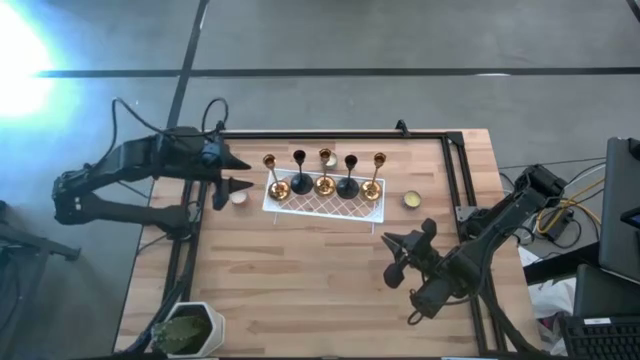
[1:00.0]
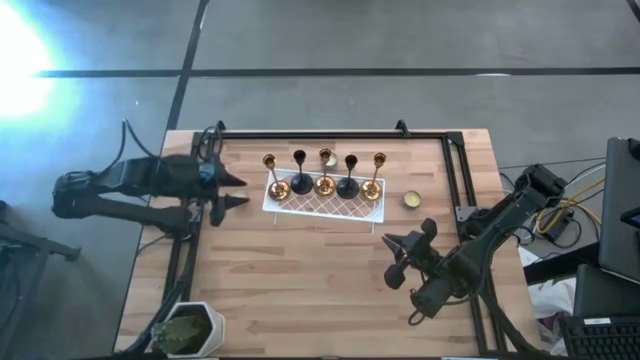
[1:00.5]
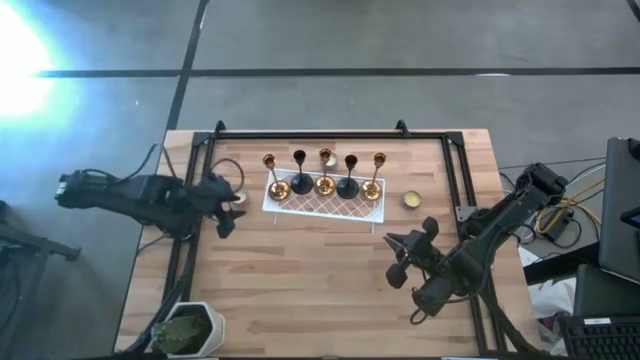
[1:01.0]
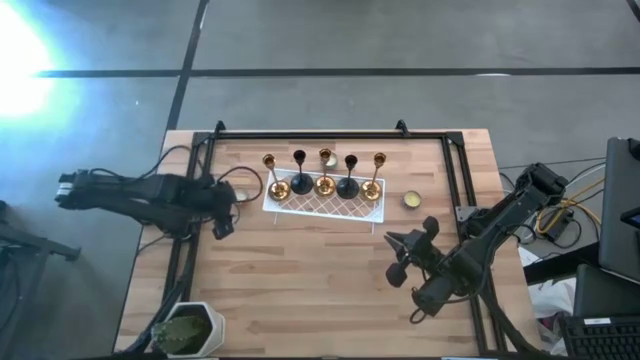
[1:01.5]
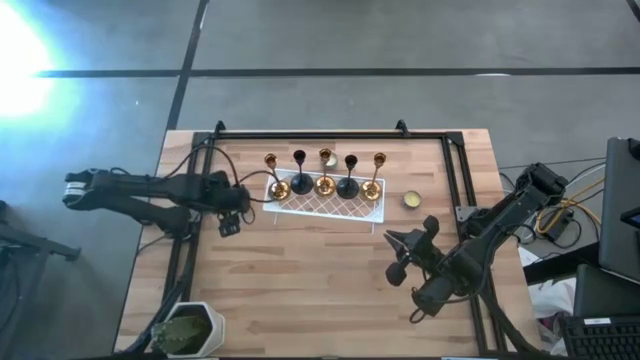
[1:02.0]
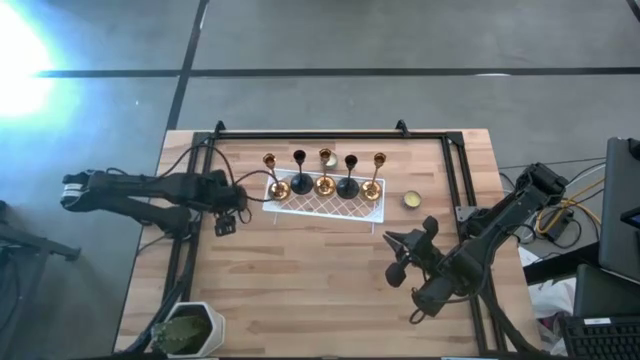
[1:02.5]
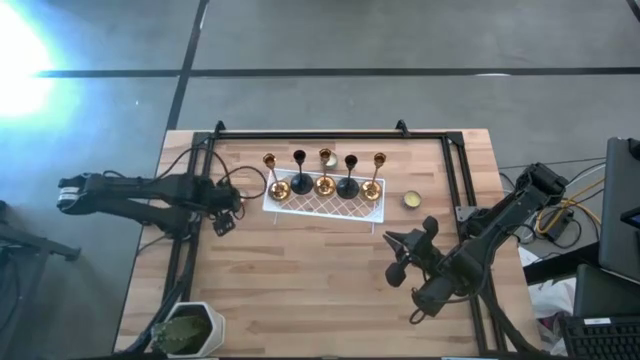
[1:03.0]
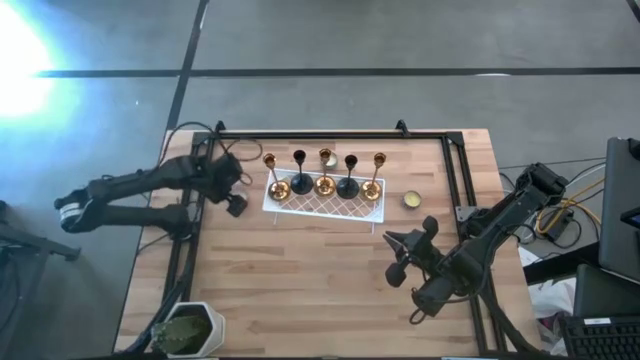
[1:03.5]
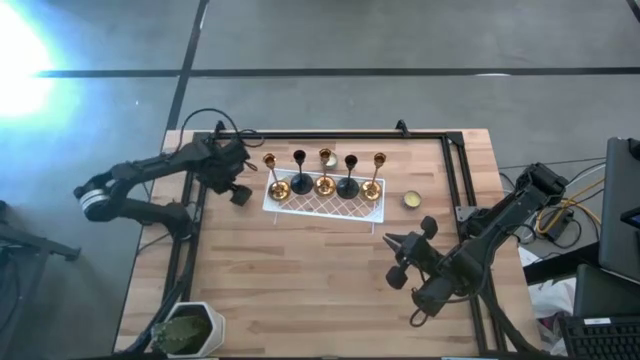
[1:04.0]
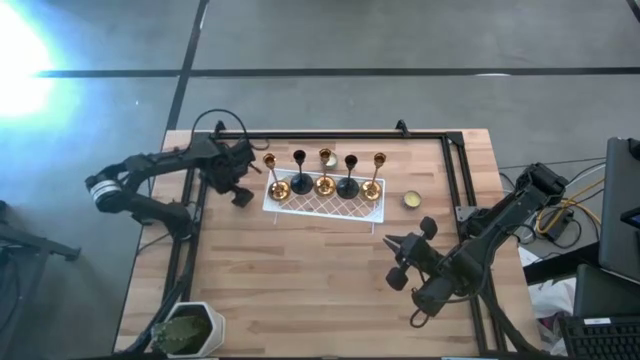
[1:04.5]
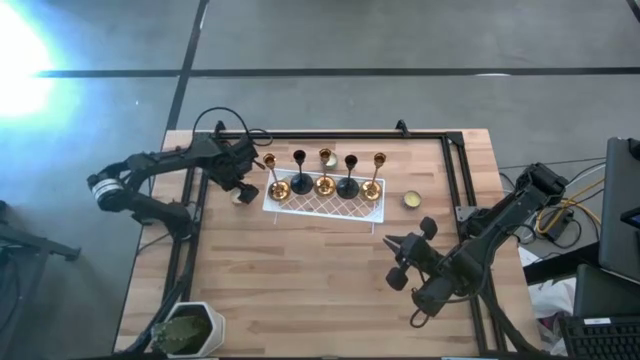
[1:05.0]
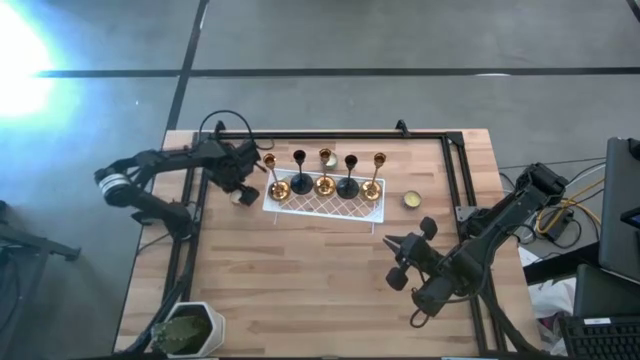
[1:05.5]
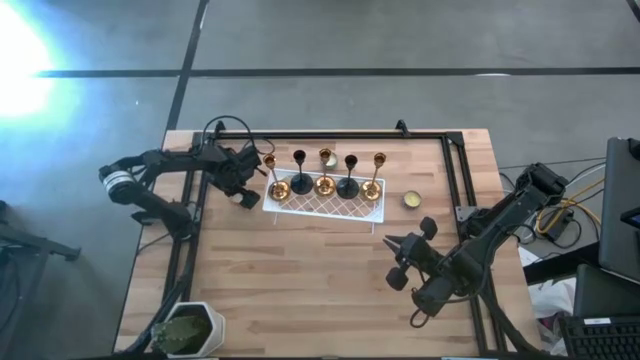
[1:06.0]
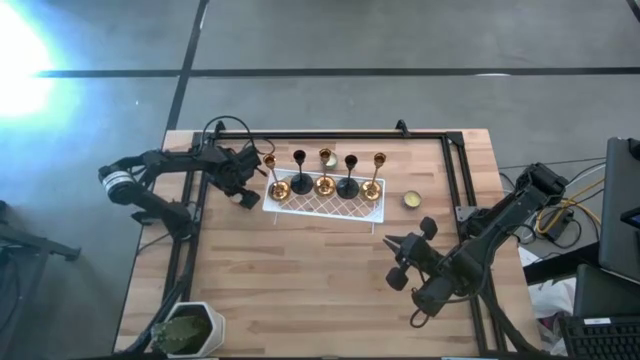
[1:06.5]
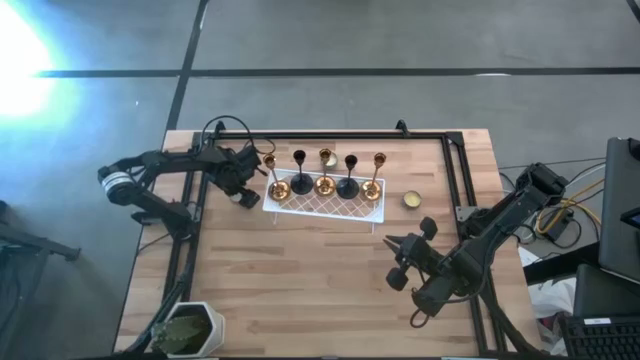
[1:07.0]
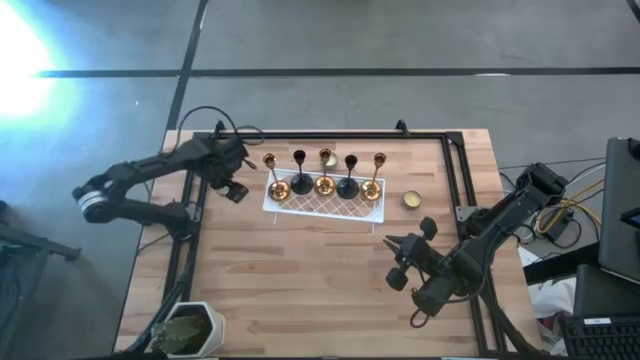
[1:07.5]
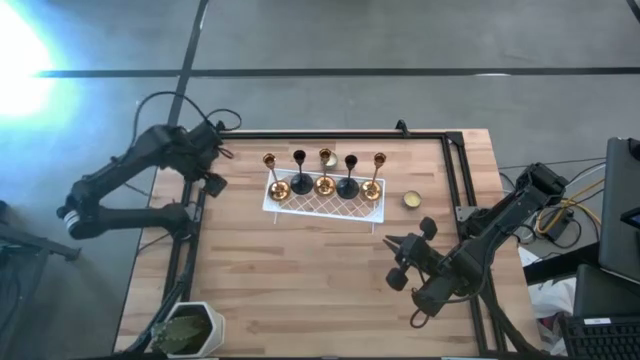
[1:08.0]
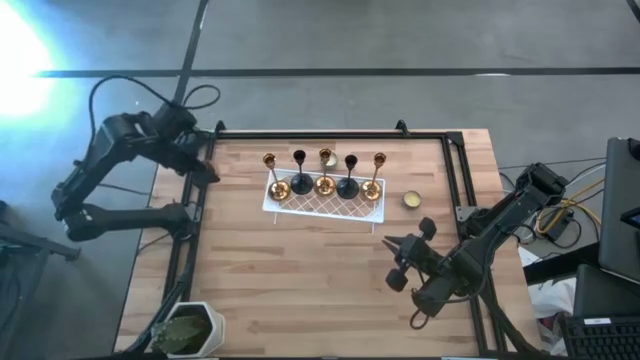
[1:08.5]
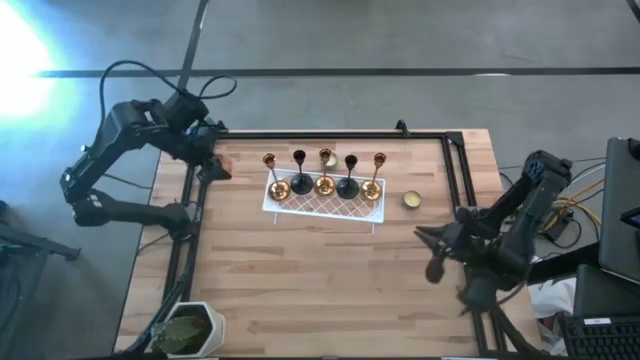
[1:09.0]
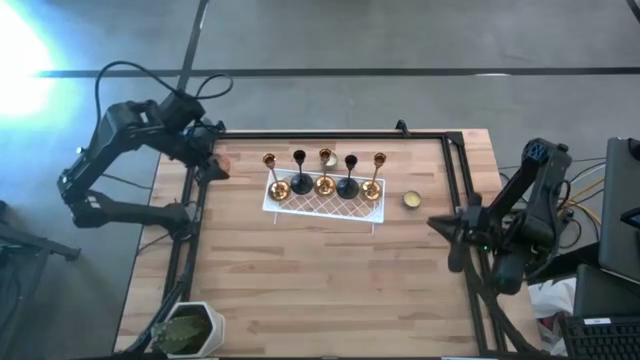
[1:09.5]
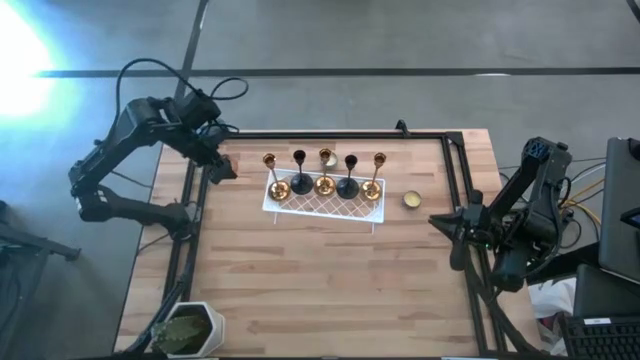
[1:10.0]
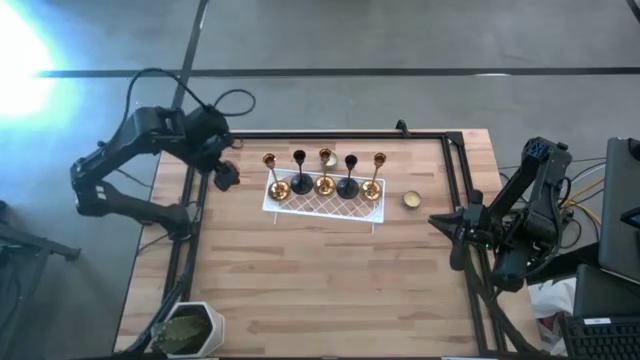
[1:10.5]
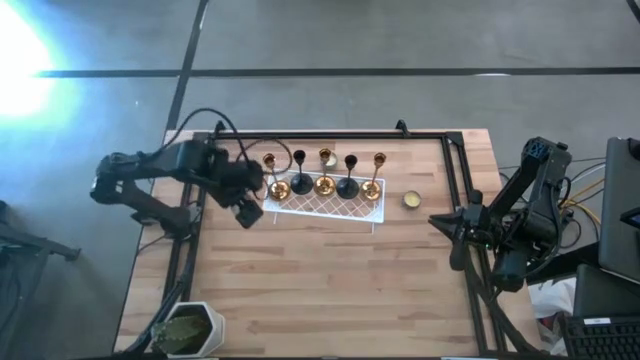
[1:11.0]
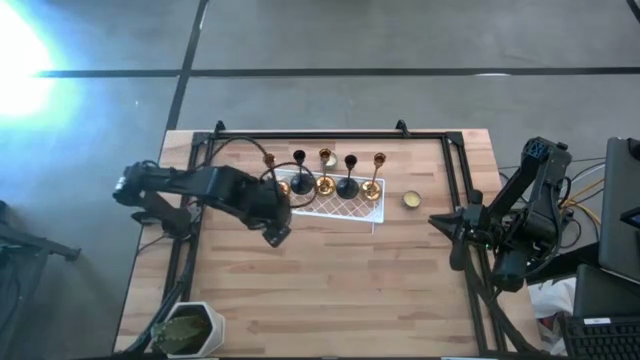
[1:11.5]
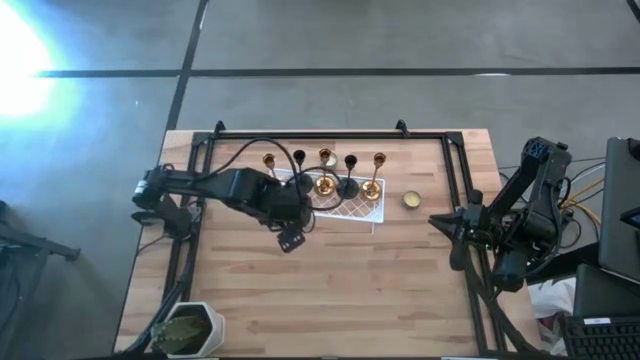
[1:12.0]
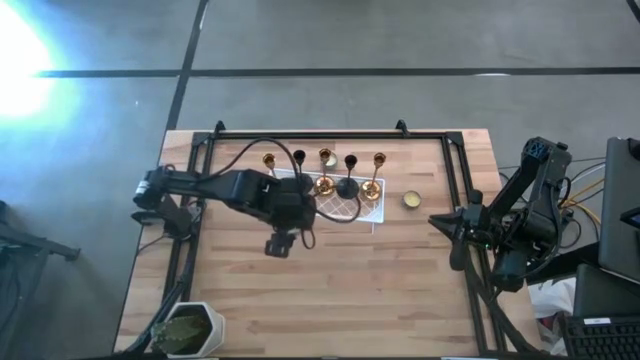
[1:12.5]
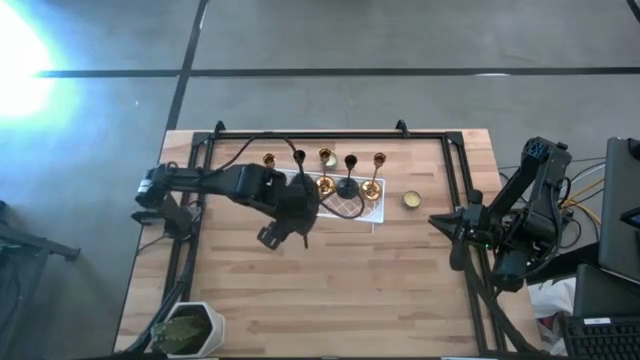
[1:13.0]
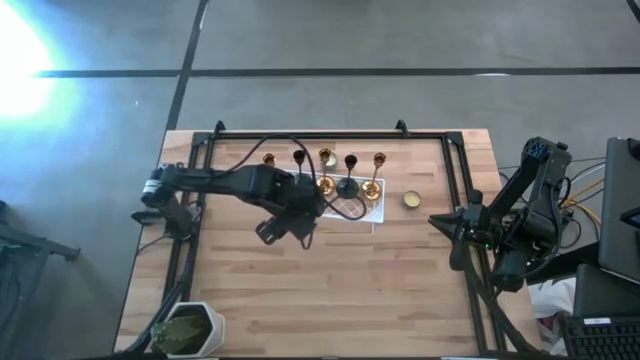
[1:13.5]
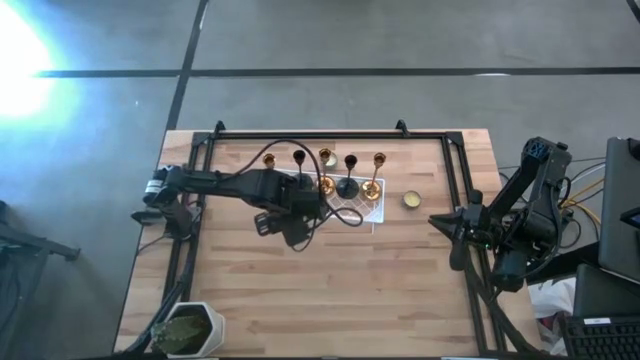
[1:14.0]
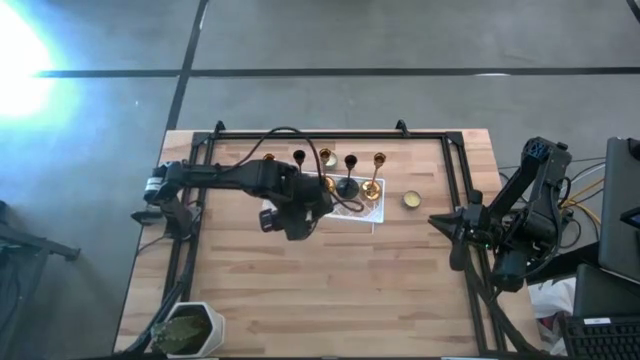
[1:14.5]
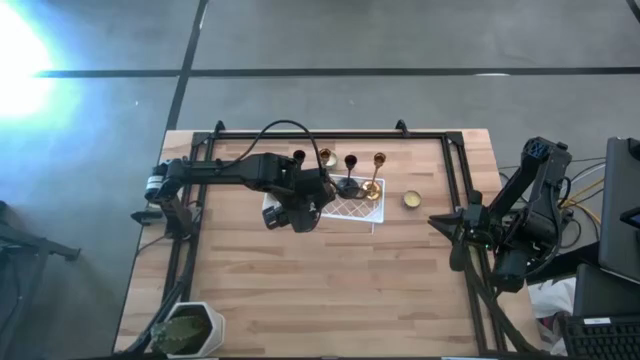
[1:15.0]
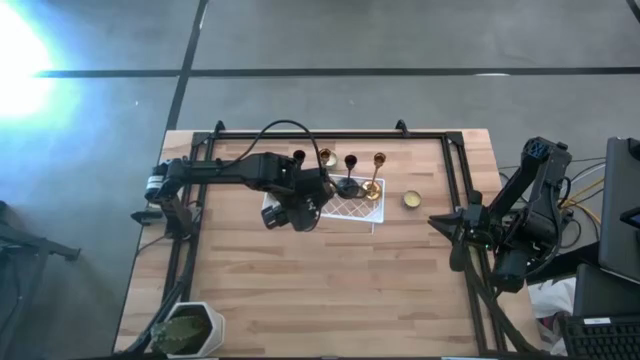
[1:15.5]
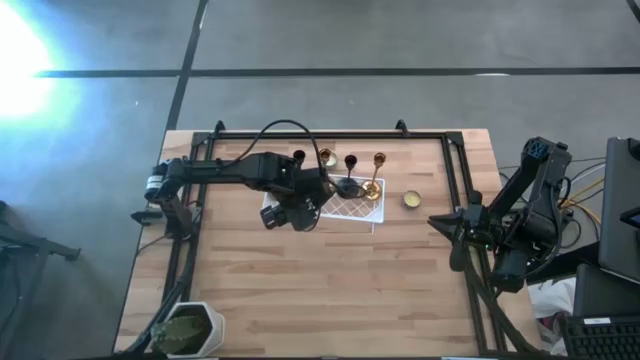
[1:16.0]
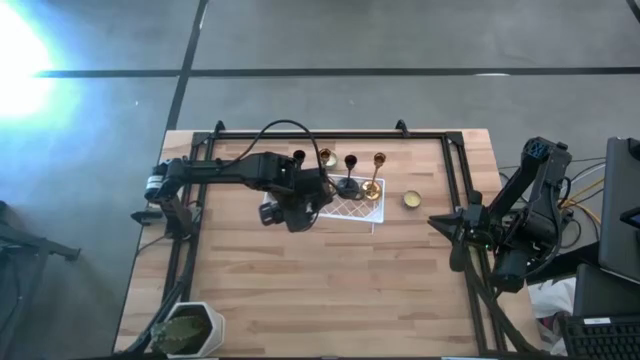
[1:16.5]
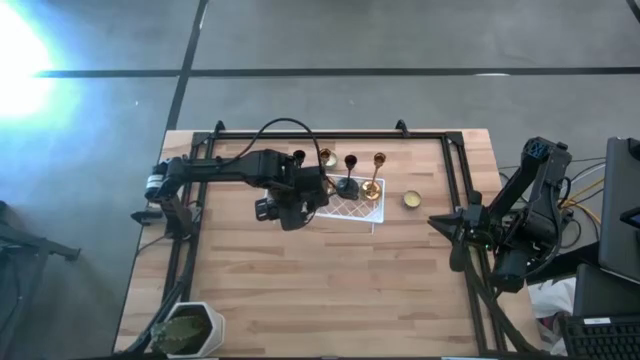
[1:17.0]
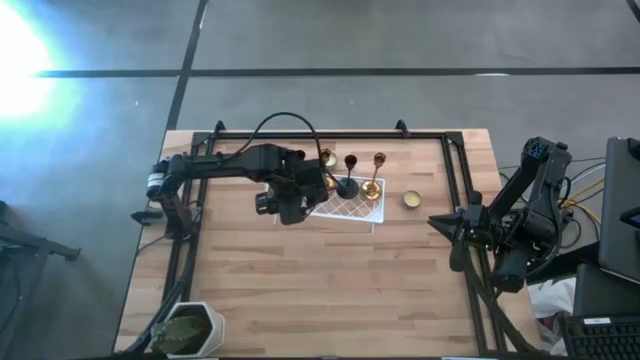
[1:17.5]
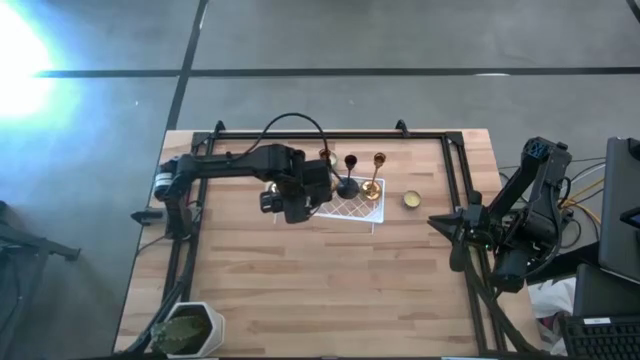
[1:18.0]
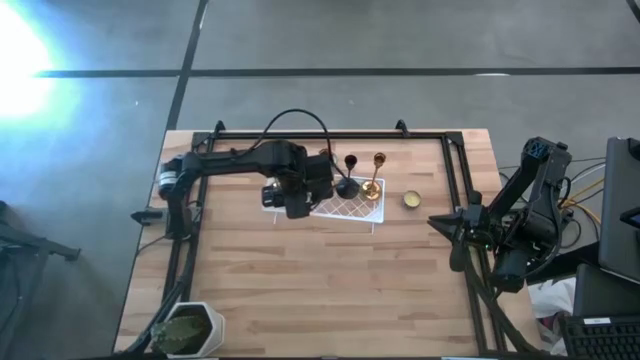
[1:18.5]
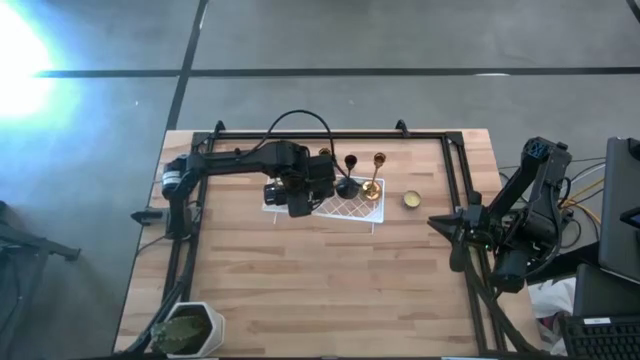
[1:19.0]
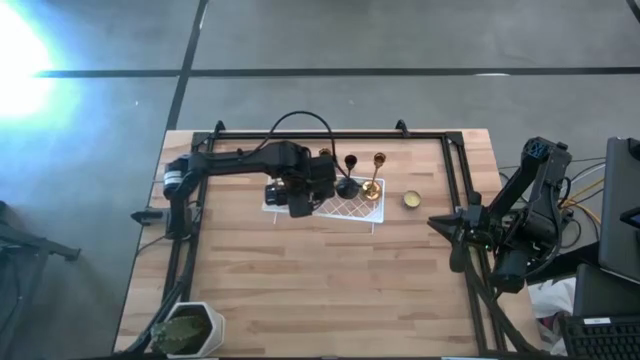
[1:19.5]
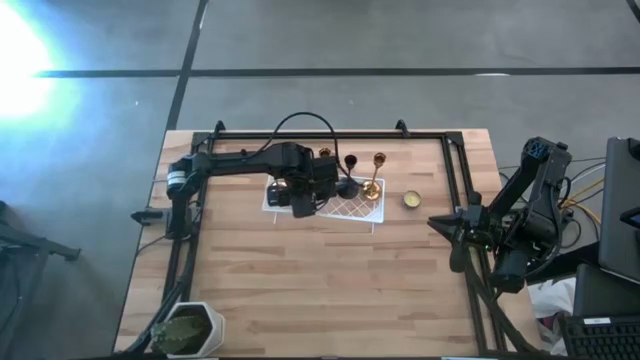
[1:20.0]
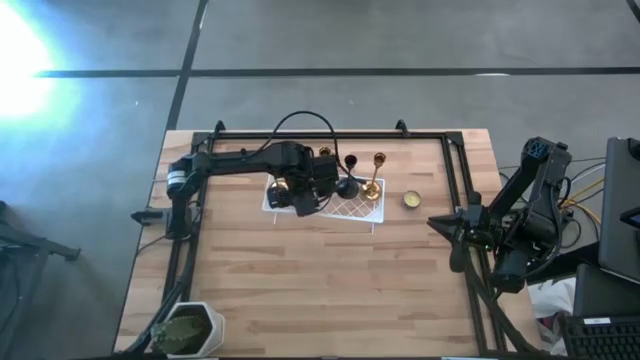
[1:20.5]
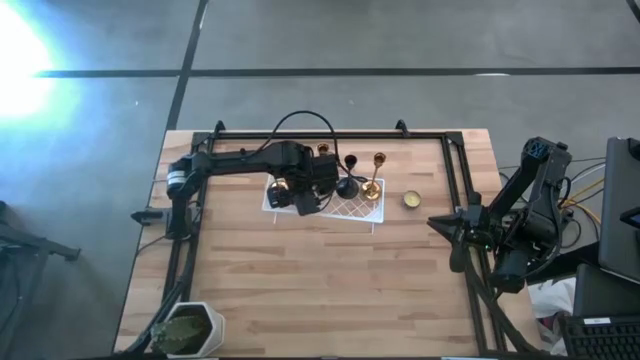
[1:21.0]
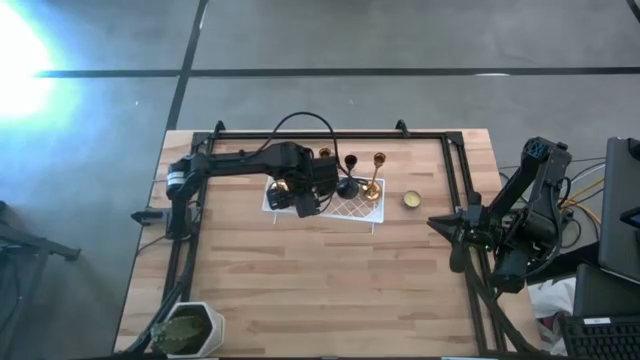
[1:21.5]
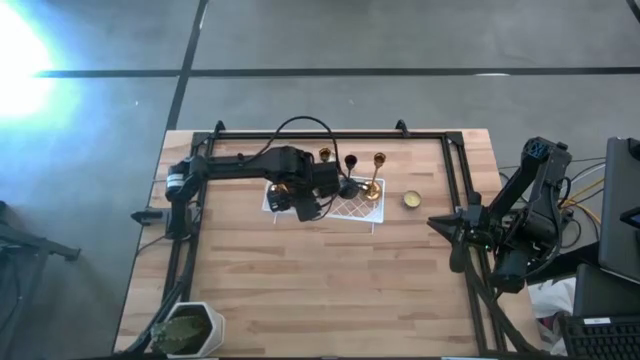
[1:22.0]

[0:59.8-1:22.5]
Task: Pick & Place candle stick holders
Put the orange scented candle on the shelf
